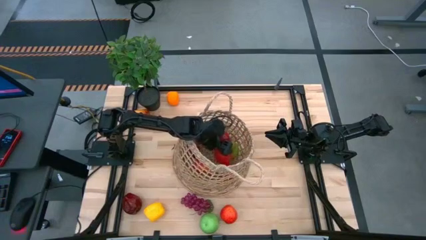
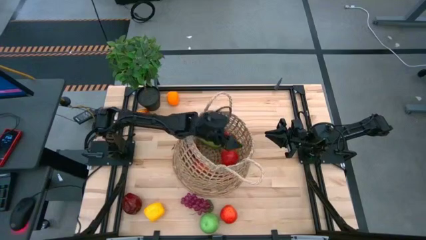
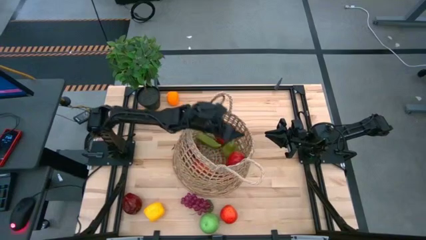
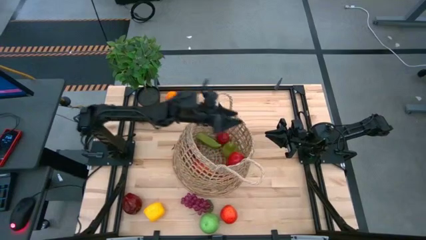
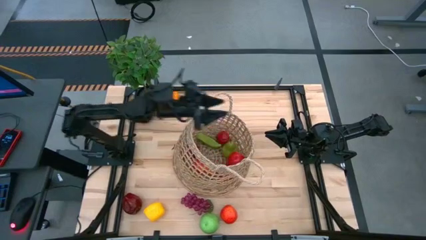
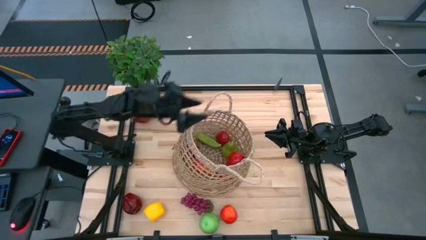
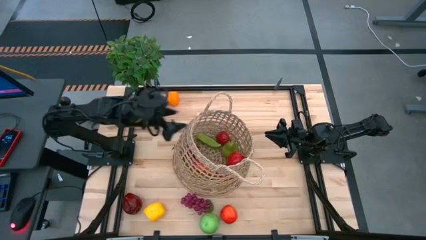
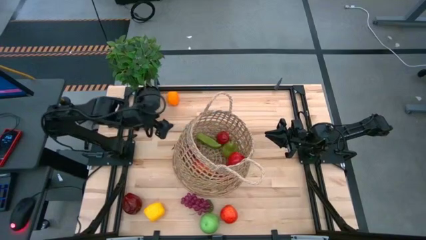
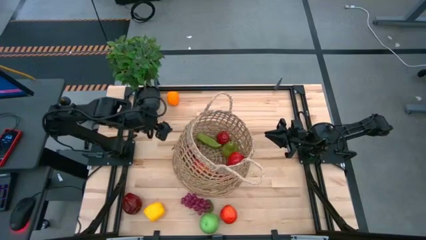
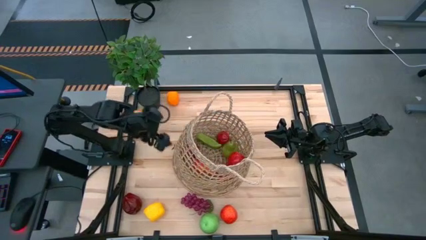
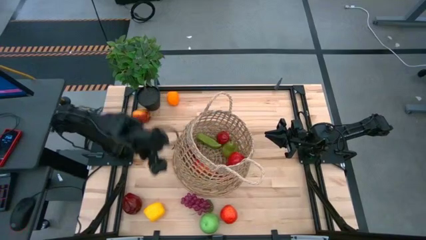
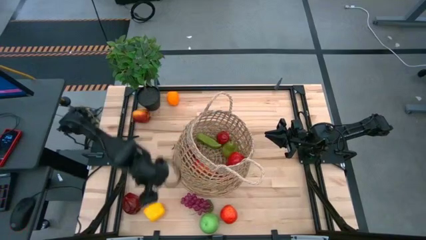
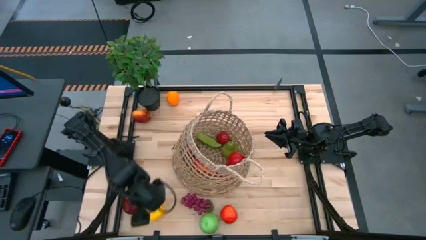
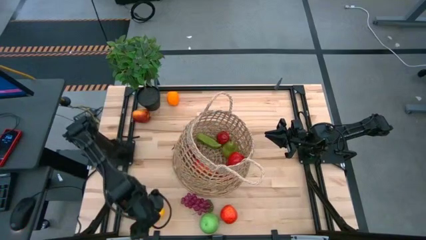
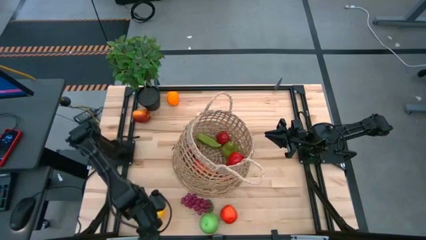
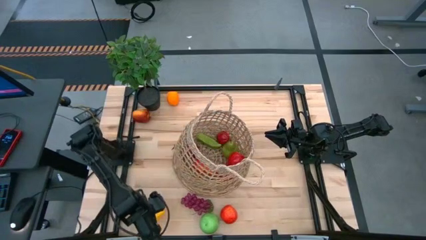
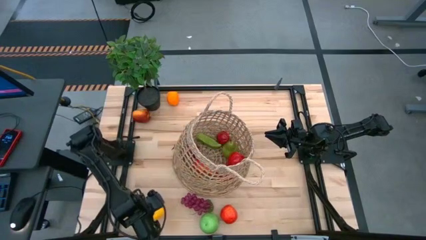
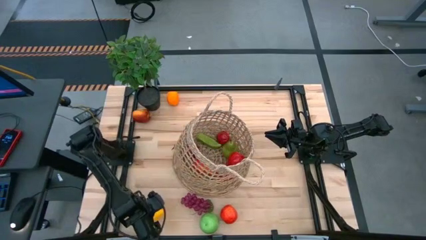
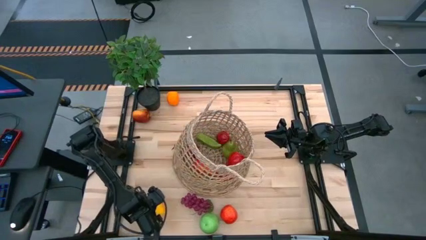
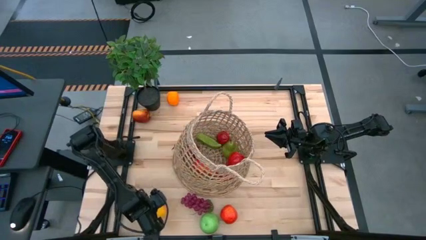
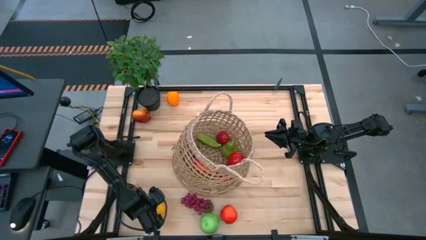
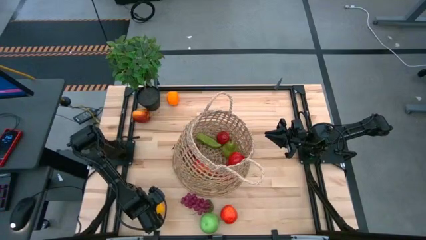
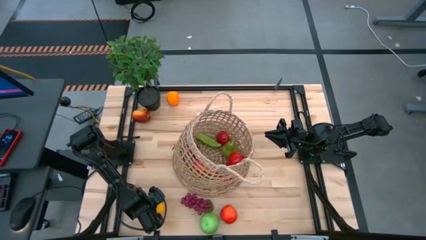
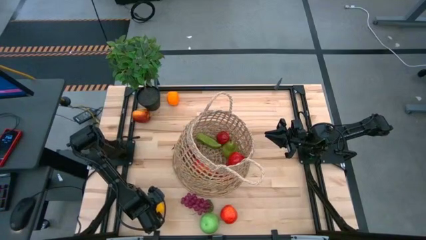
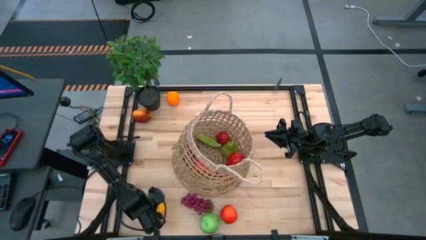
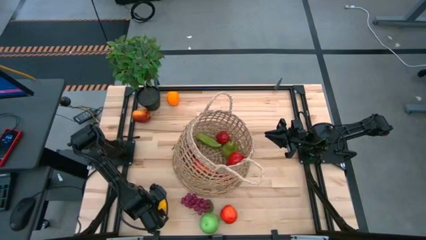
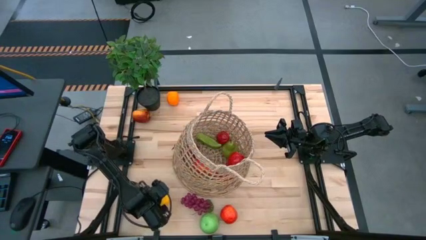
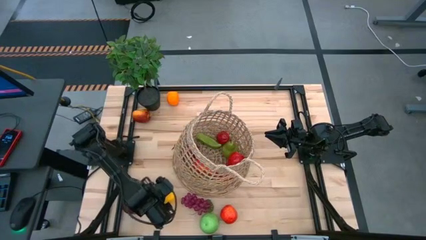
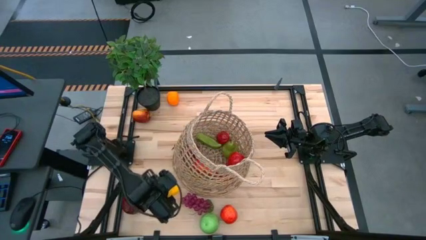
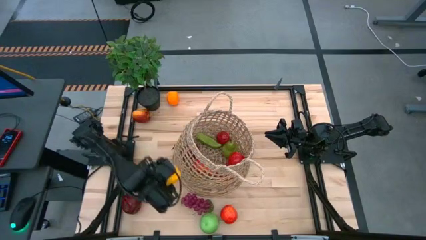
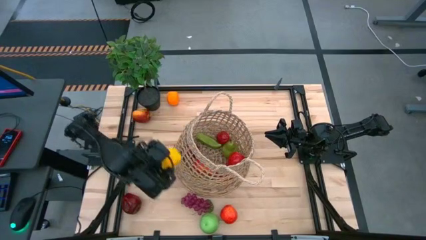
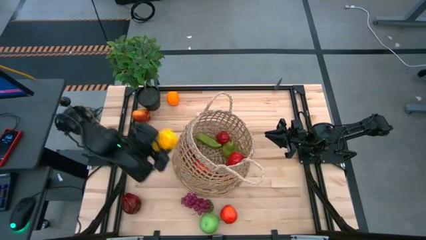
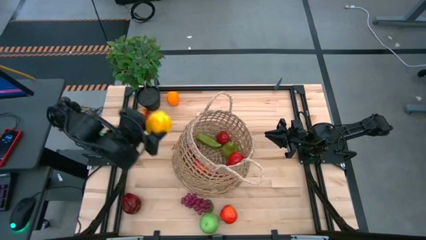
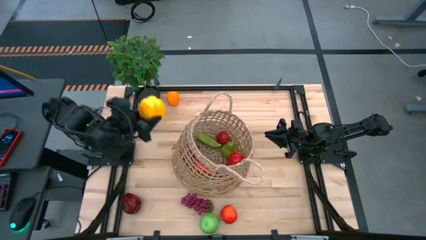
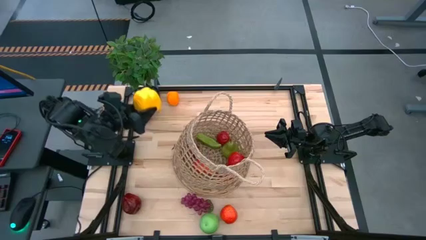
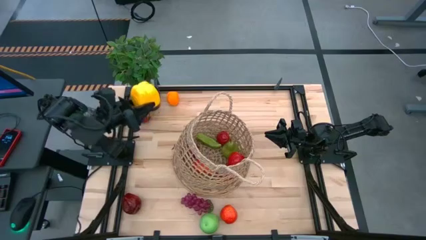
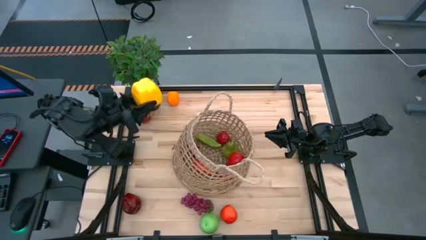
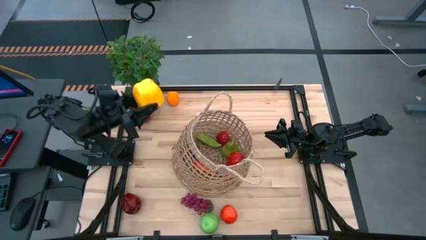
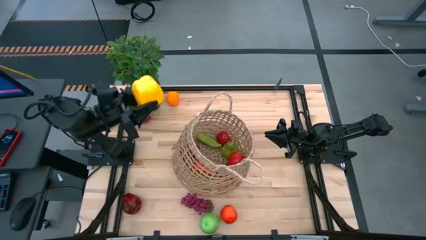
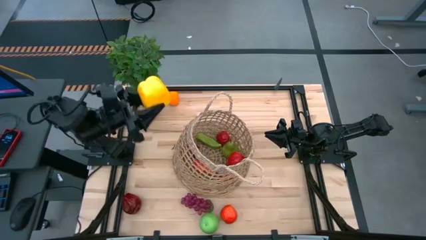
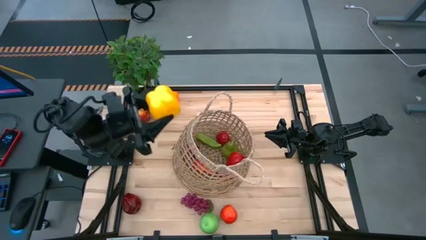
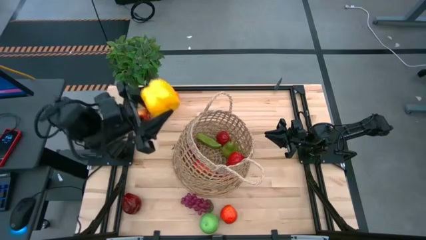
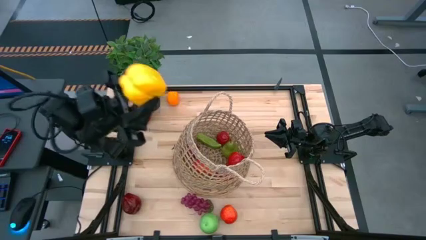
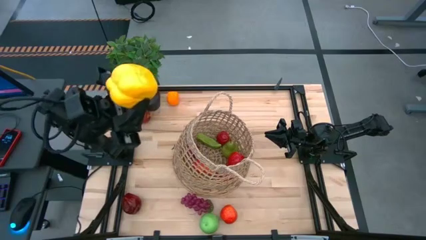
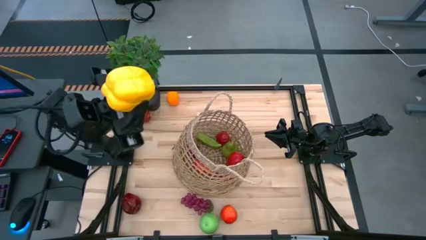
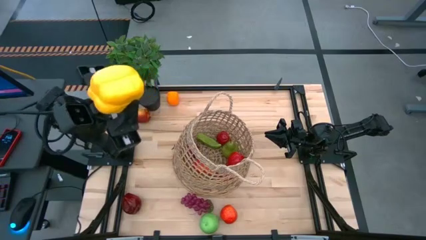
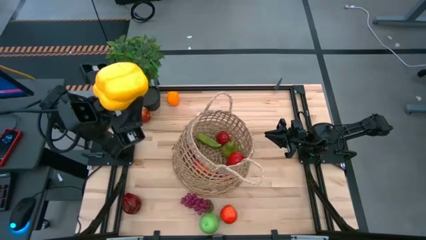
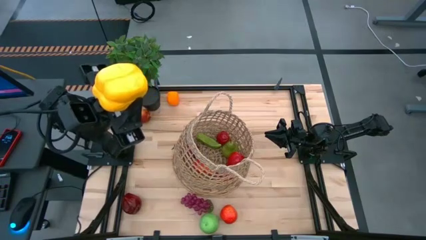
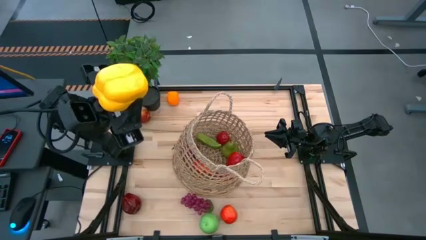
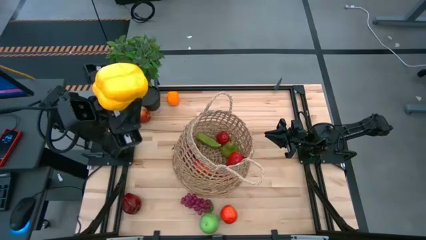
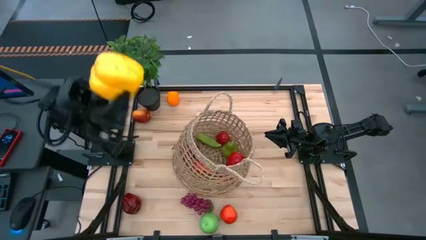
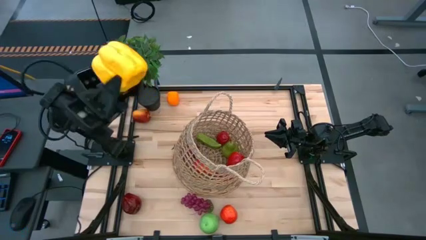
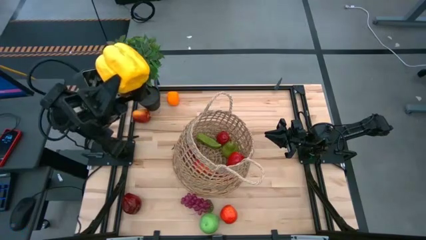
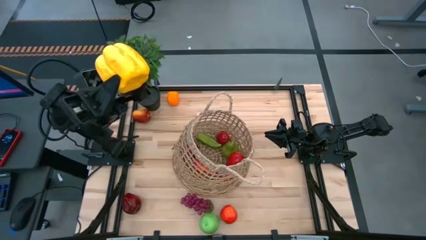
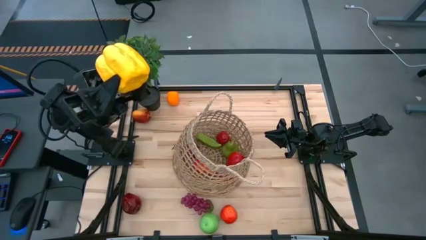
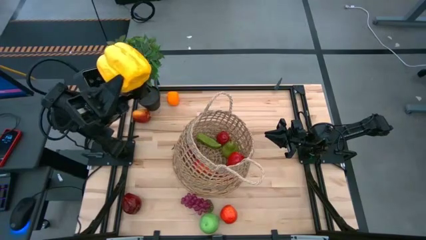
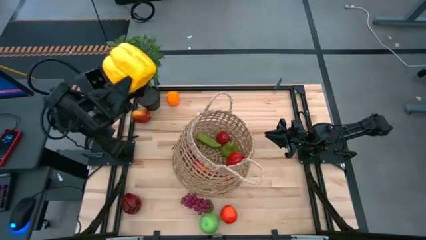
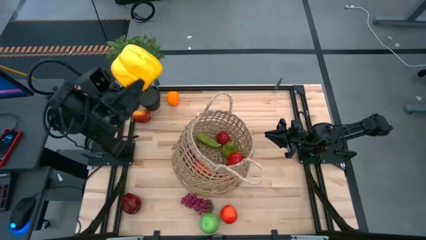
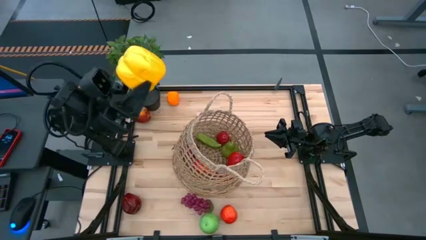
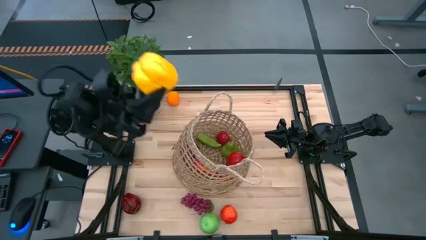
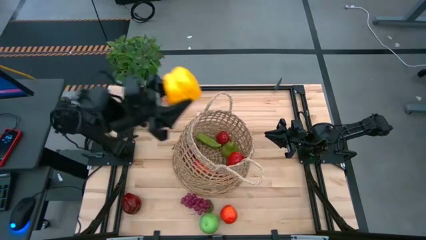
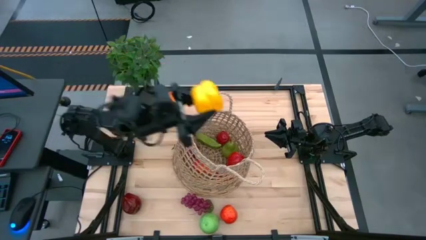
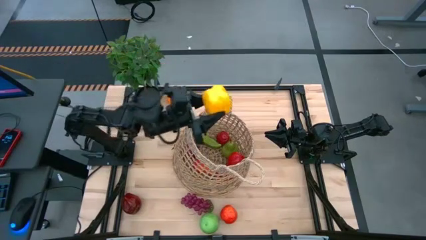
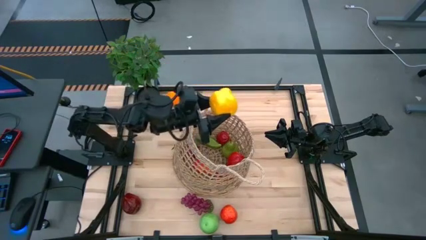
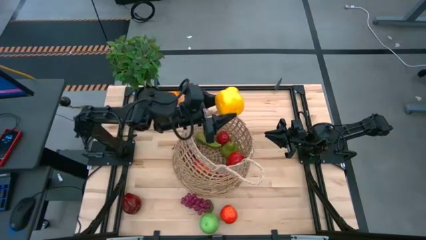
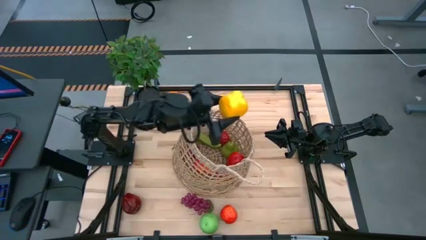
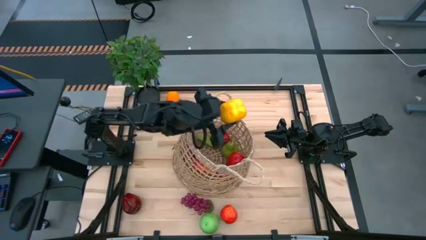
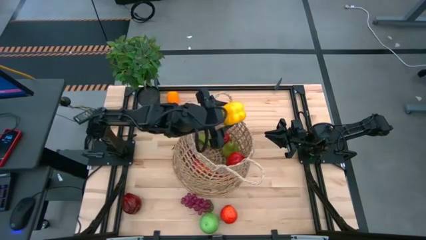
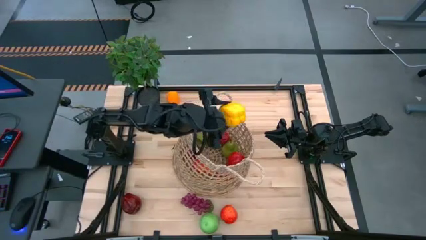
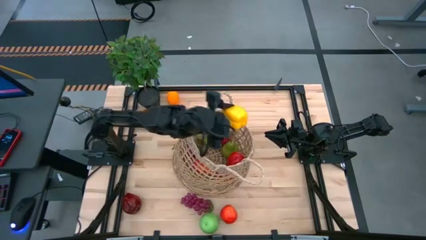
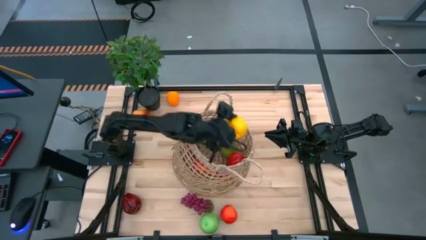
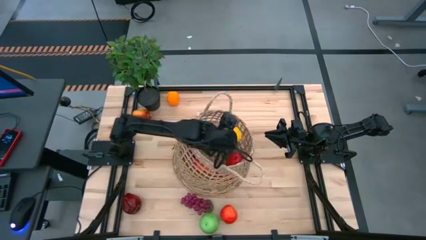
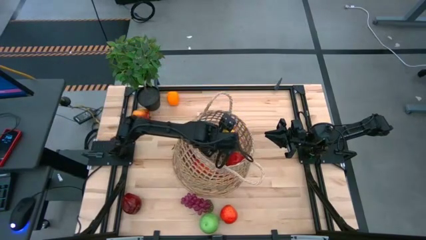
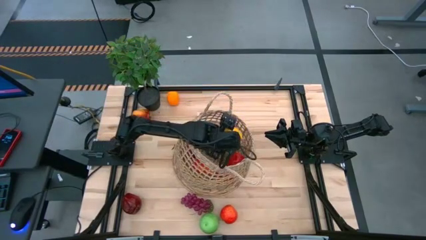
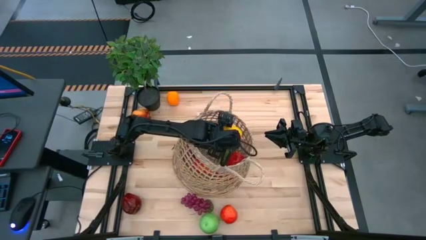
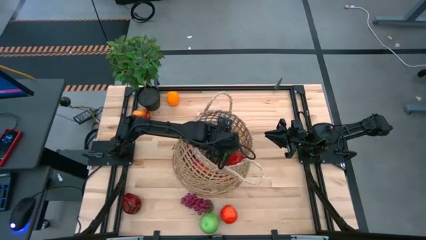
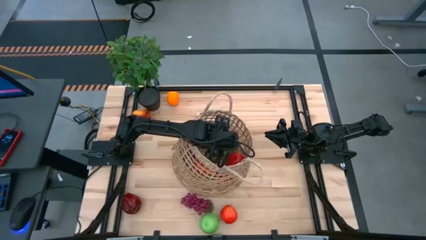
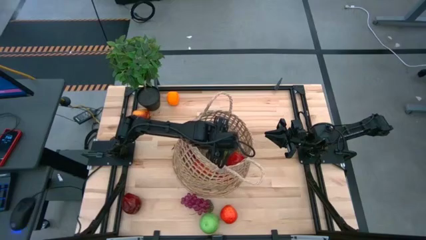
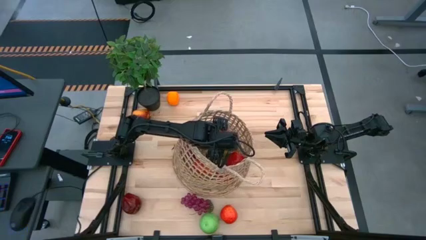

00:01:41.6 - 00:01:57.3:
Task: Build produce basket
Put the yellow bell pepper into the basket
